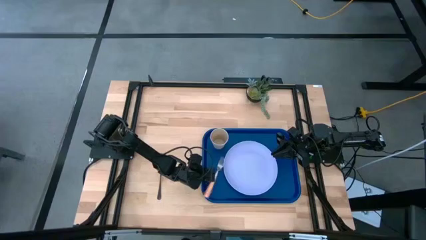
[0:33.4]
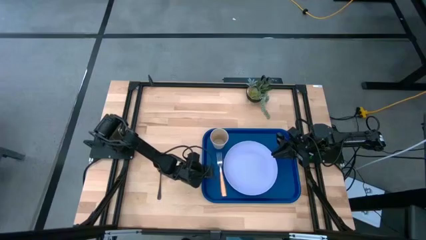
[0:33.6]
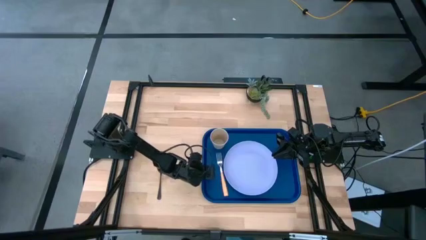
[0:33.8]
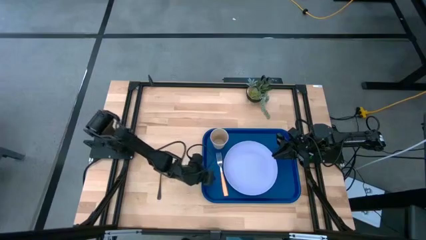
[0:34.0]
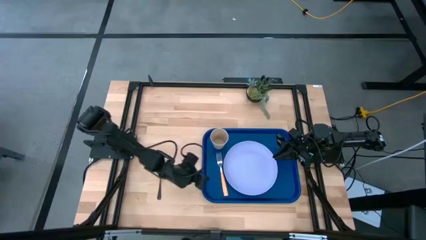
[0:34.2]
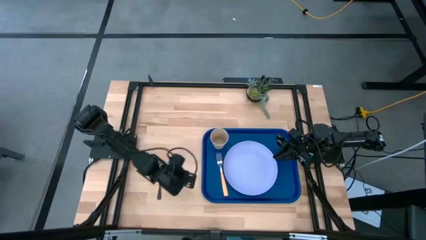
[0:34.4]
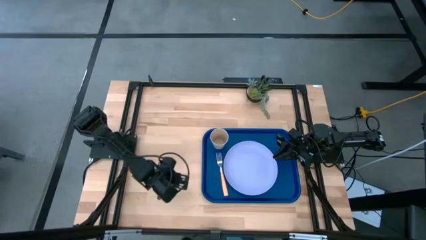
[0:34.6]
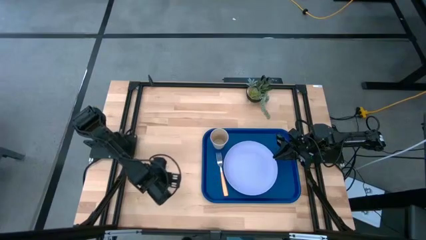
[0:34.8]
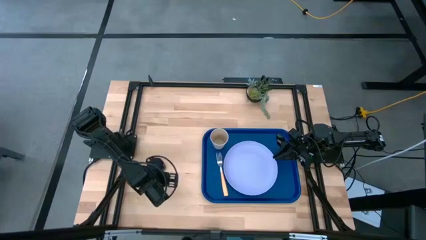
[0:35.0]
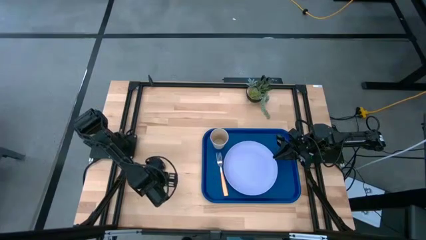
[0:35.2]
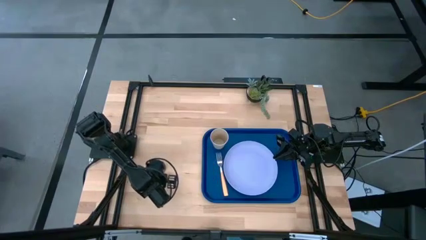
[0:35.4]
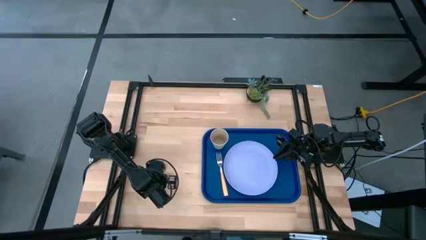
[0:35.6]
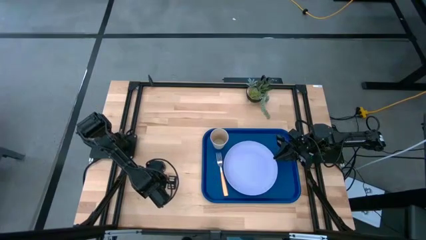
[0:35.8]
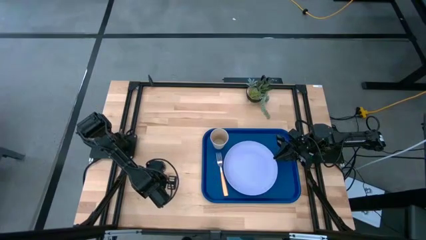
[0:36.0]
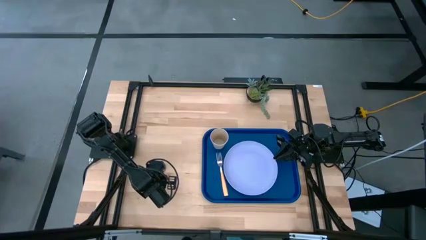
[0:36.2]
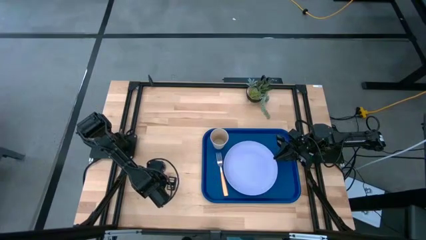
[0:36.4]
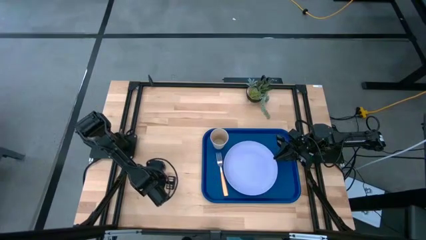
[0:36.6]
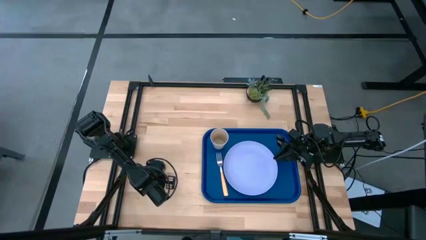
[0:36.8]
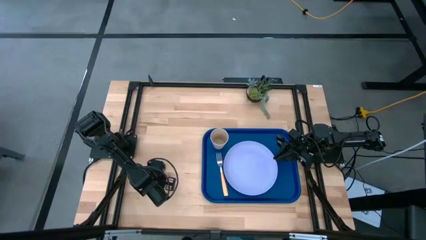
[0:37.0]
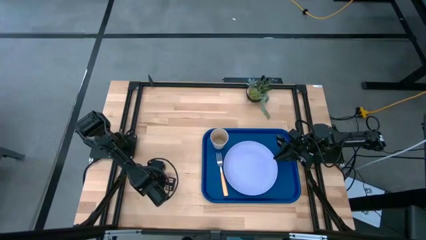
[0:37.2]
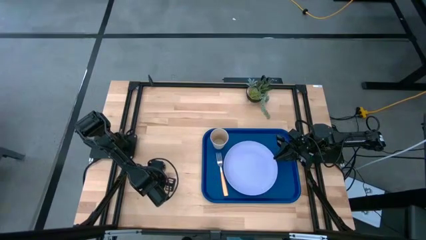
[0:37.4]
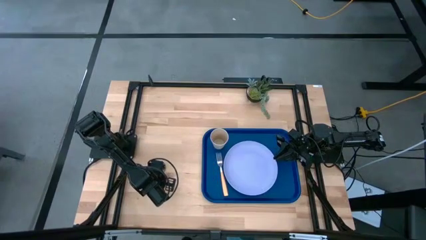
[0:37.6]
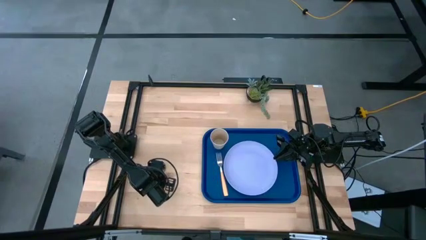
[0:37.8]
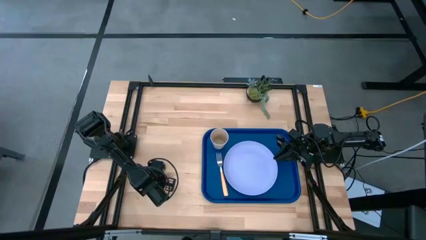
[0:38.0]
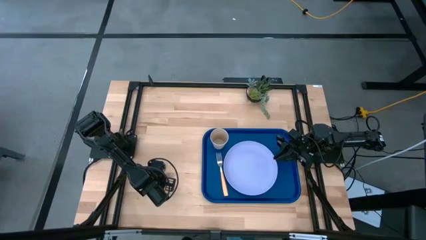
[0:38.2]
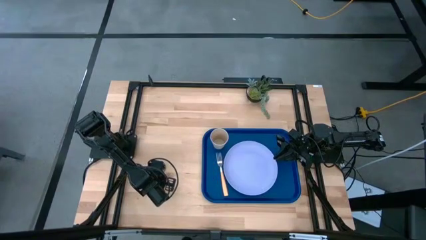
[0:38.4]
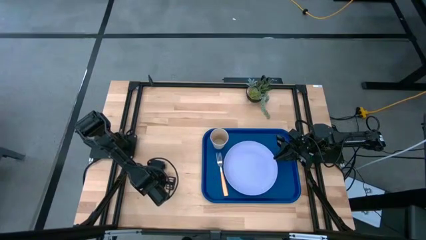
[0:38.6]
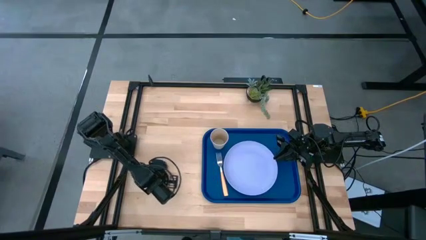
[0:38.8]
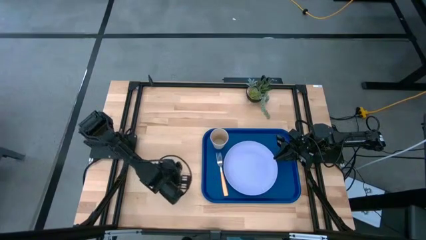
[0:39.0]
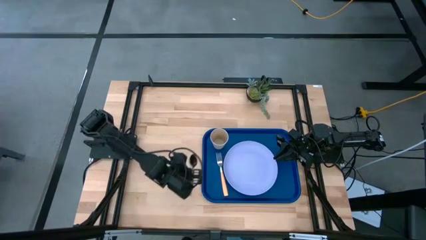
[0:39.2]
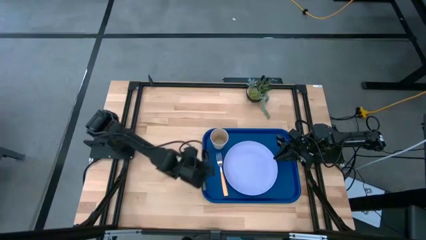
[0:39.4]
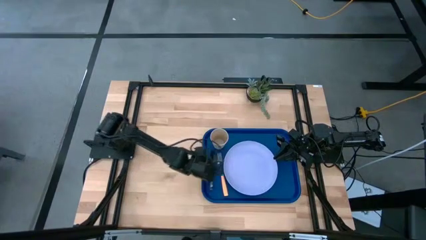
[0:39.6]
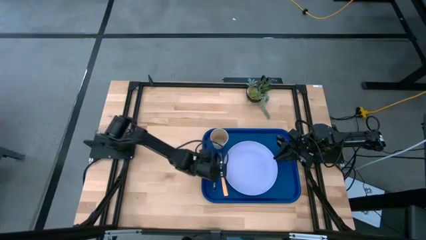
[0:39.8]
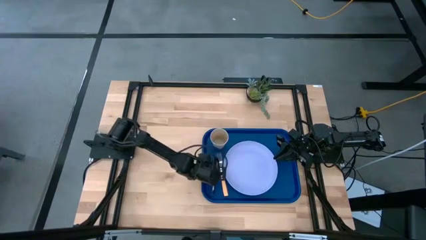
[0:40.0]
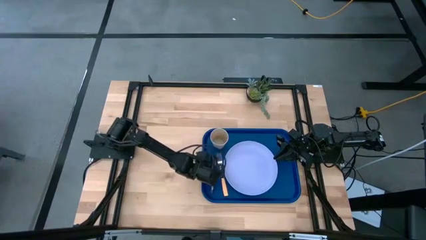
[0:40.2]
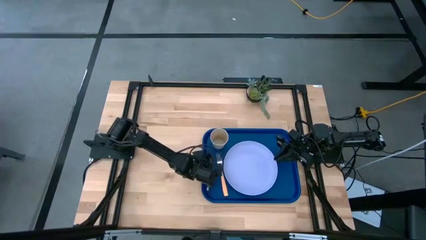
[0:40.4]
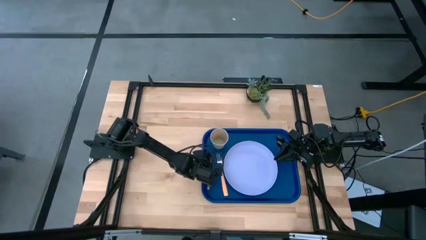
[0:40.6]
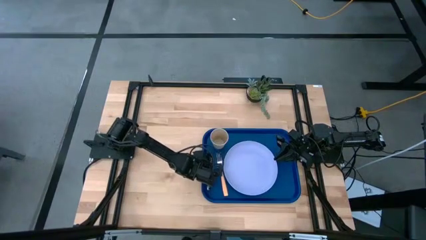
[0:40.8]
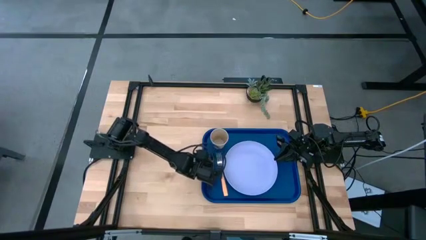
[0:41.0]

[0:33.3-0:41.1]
Task: Pick and place plate/cup/fork/spoon on tray
Put the black spoon on the blue serving tray to the left of the brown fork

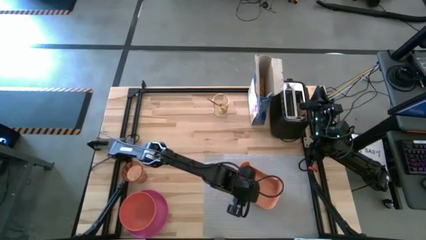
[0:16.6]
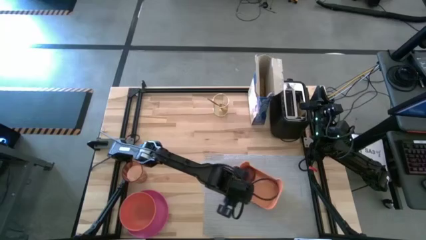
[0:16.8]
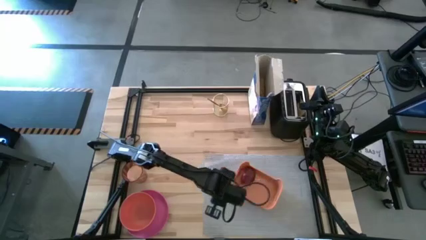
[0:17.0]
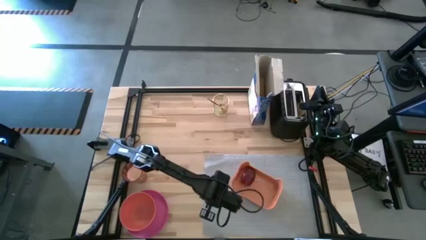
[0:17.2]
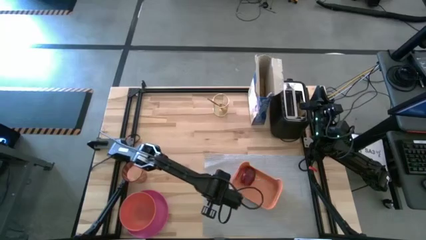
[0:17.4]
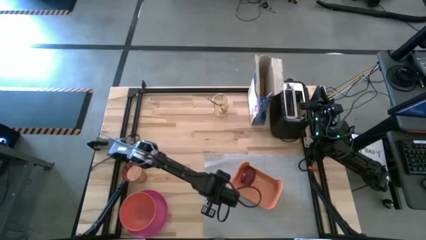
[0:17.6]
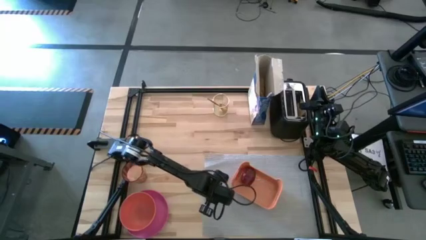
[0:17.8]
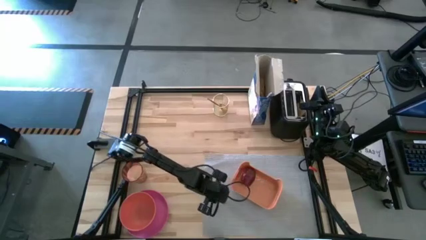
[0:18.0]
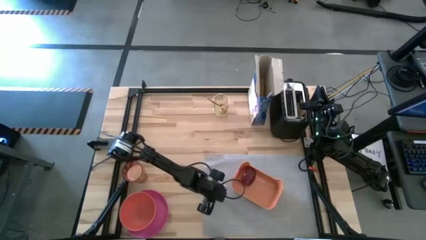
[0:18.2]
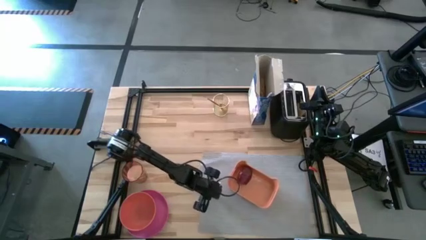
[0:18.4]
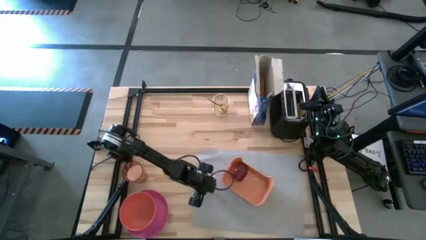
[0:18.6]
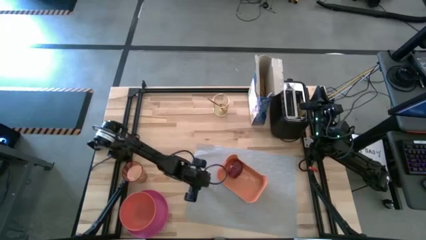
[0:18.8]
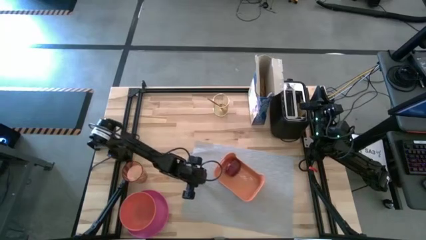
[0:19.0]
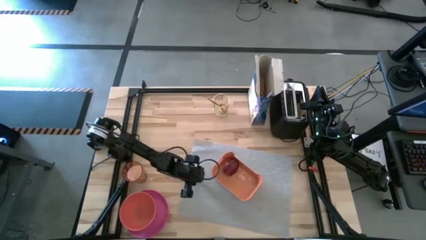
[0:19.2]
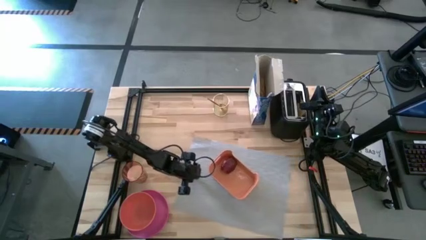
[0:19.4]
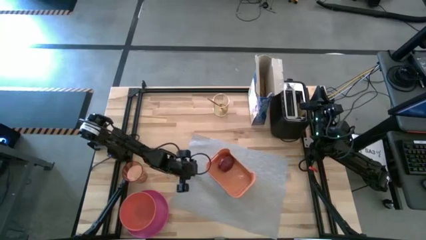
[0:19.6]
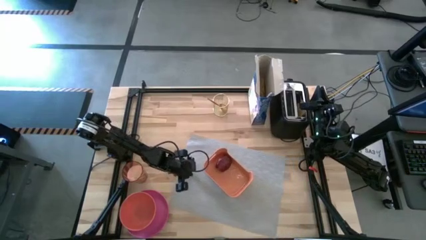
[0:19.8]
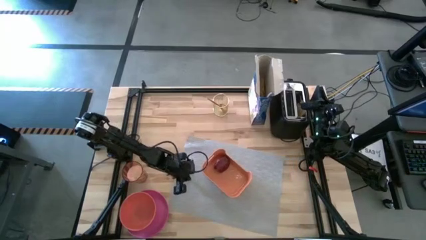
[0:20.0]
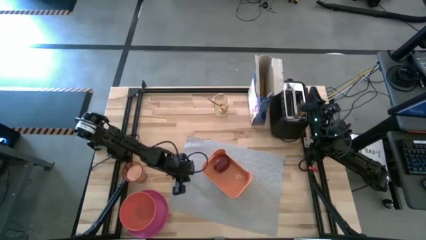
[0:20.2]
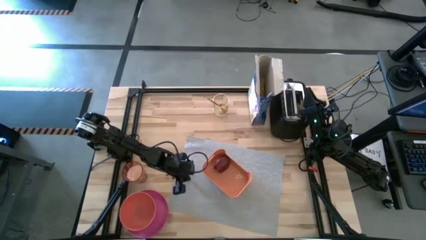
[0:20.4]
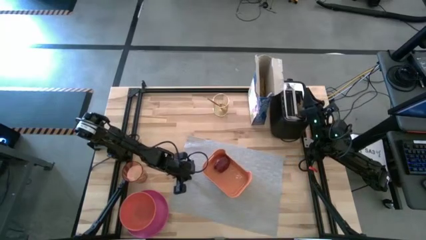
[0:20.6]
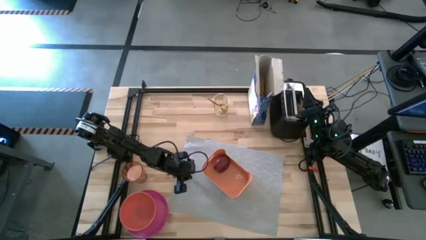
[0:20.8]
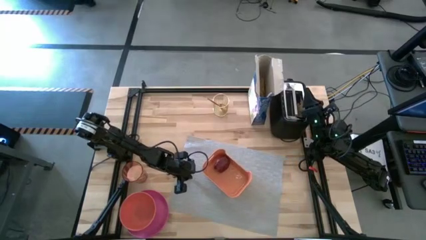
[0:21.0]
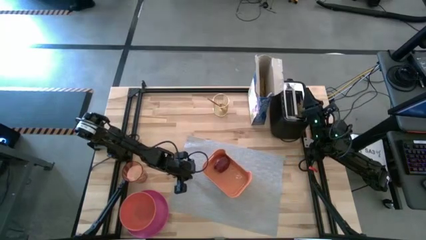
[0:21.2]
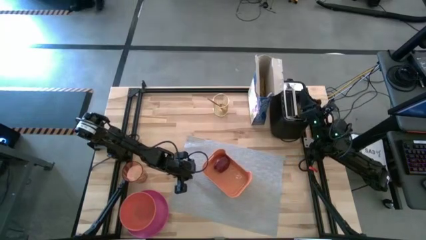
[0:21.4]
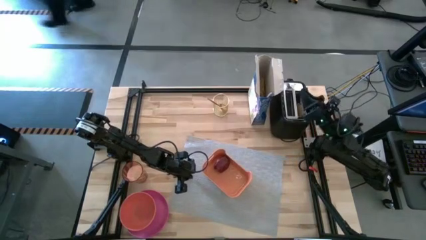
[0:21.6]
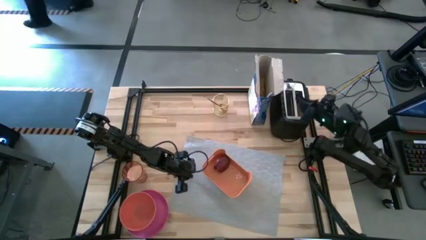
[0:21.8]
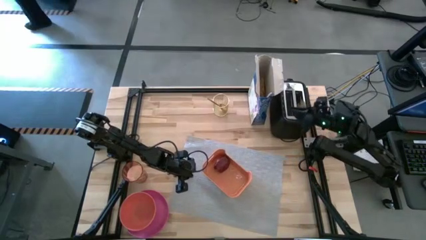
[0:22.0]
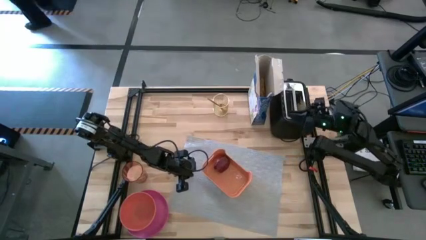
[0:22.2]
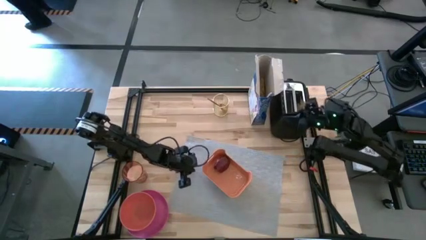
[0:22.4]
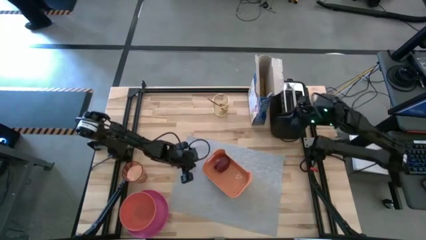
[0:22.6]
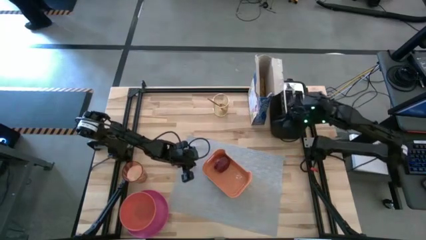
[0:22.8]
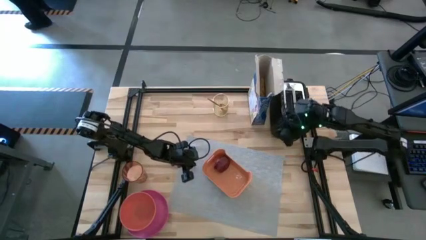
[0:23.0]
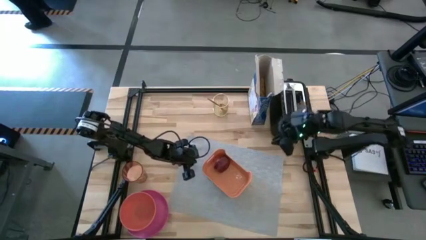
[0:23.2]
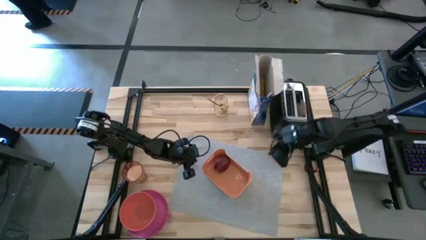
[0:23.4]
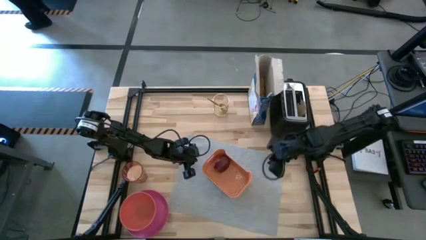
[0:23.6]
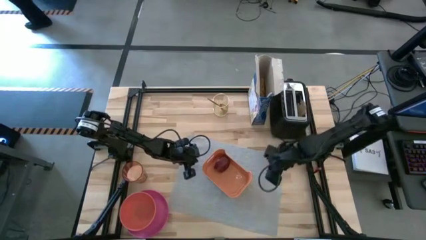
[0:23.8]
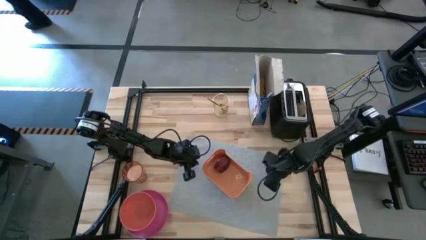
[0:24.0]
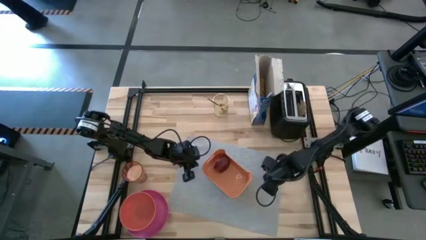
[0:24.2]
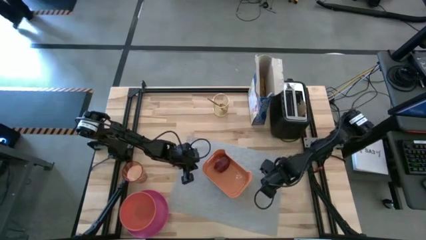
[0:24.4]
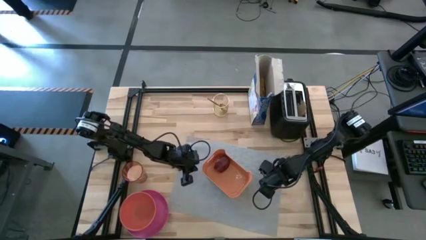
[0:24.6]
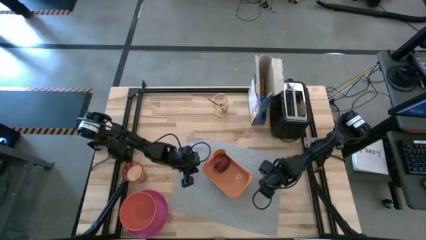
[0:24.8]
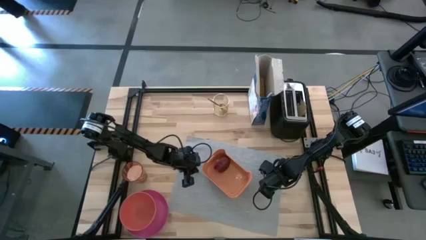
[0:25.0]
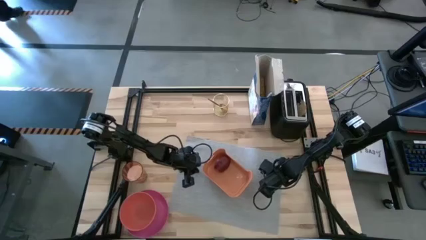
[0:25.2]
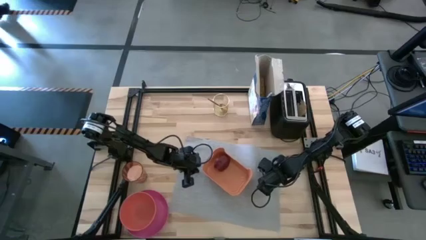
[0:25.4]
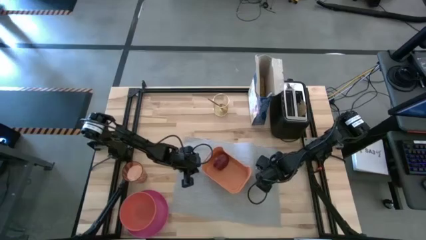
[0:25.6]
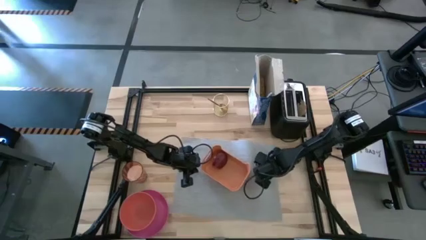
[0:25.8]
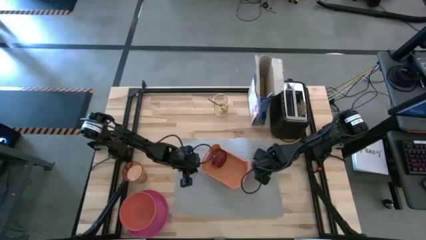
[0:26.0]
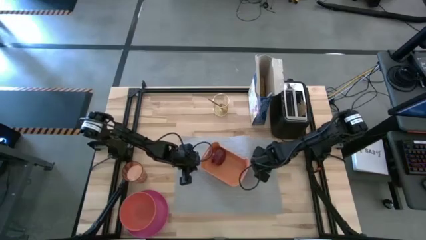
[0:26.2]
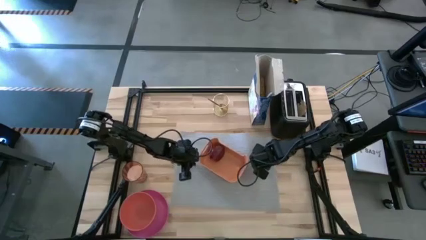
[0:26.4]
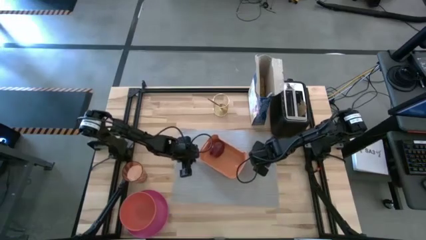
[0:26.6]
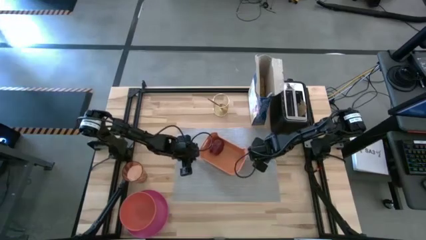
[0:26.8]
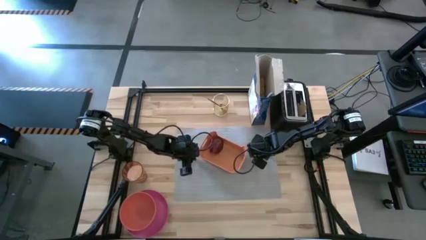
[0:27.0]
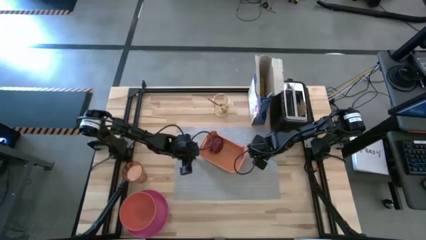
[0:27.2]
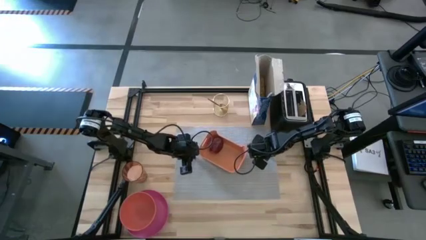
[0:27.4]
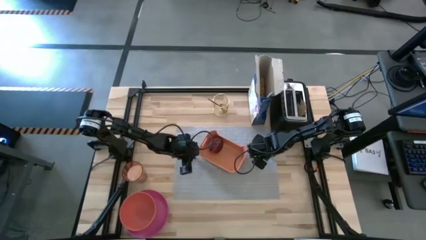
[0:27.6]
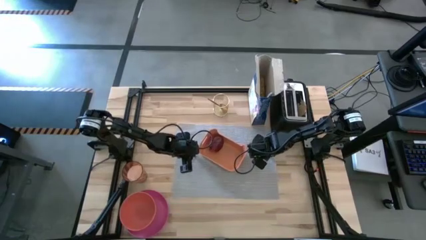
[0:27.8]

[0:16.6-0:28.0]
Task: Arrange a breakfast setting
Move the gray table mat on the center of the table
